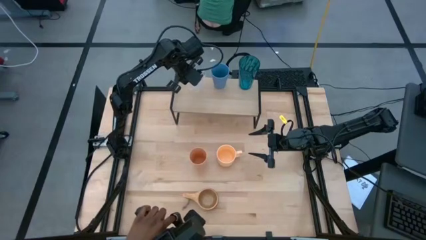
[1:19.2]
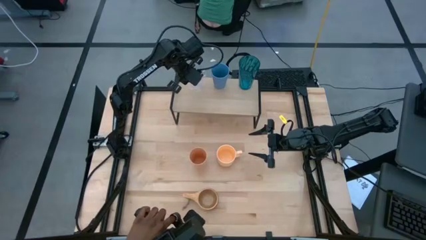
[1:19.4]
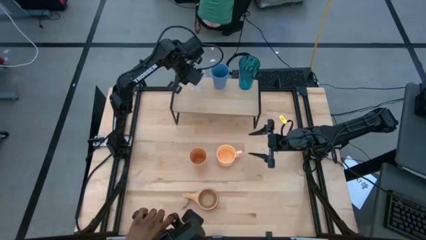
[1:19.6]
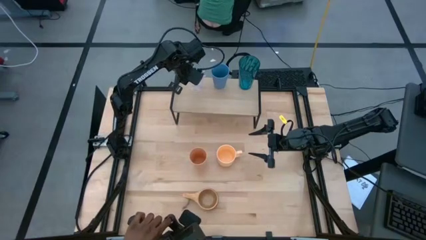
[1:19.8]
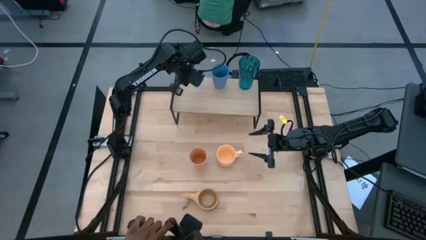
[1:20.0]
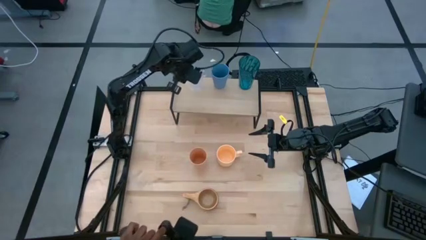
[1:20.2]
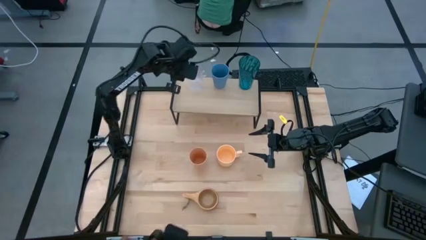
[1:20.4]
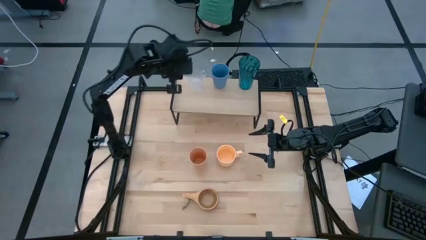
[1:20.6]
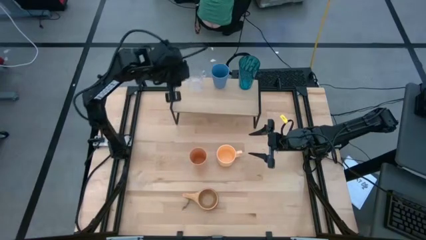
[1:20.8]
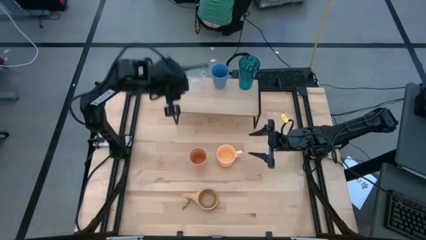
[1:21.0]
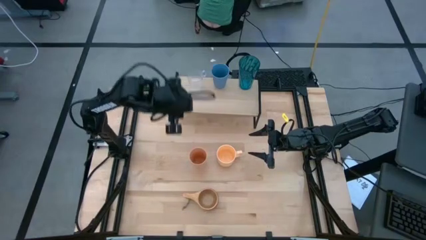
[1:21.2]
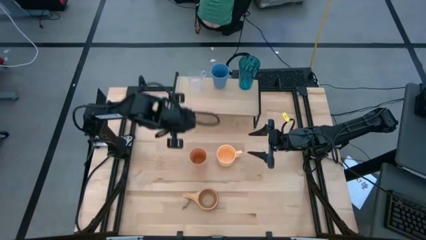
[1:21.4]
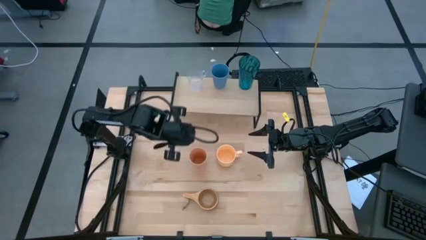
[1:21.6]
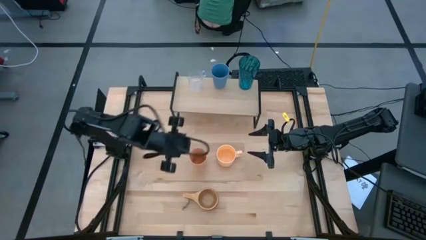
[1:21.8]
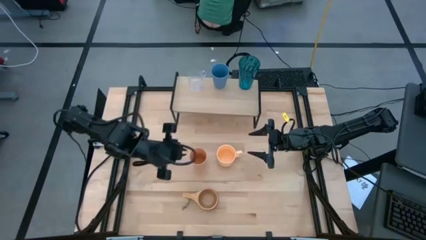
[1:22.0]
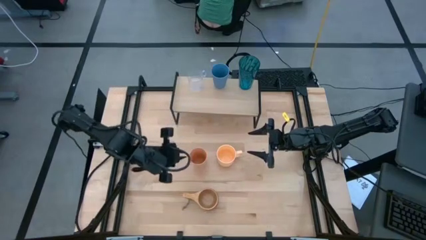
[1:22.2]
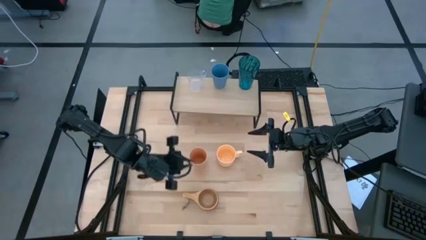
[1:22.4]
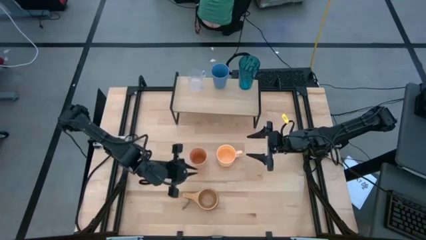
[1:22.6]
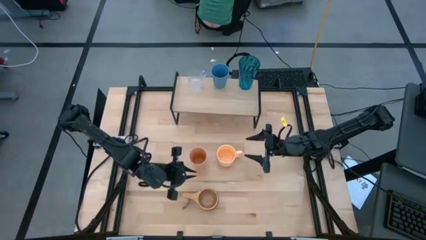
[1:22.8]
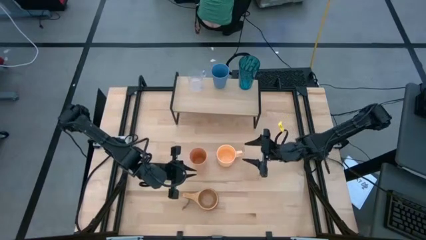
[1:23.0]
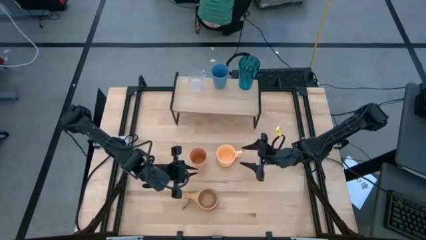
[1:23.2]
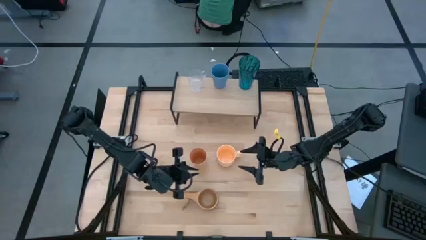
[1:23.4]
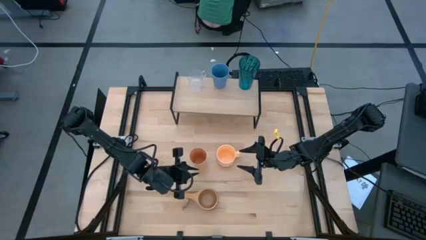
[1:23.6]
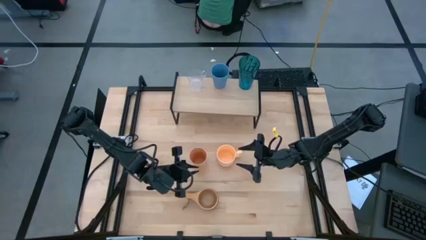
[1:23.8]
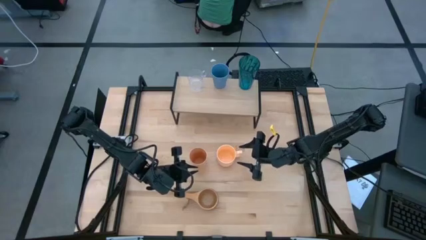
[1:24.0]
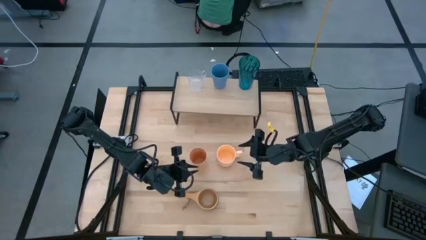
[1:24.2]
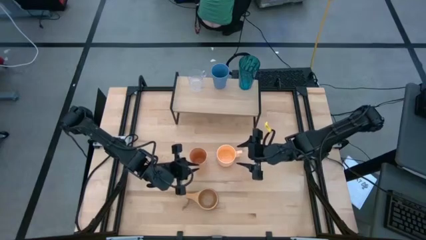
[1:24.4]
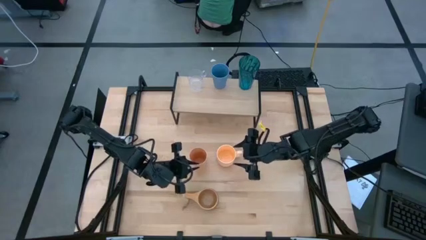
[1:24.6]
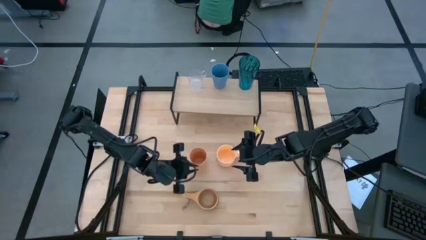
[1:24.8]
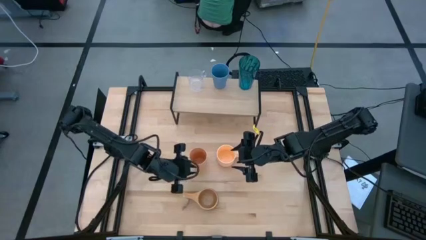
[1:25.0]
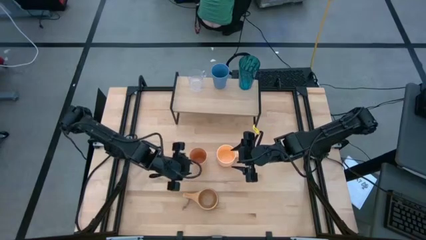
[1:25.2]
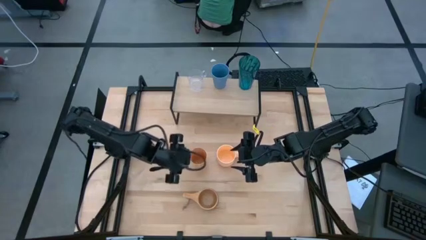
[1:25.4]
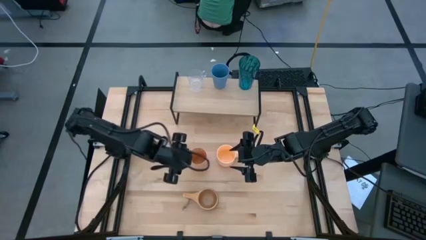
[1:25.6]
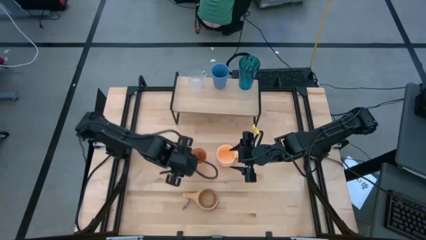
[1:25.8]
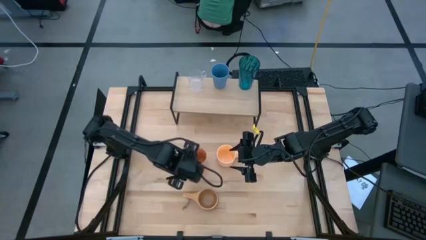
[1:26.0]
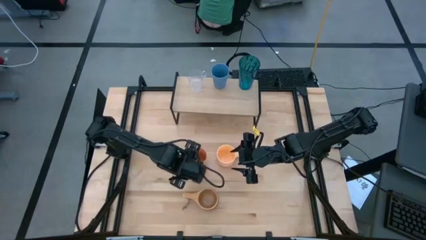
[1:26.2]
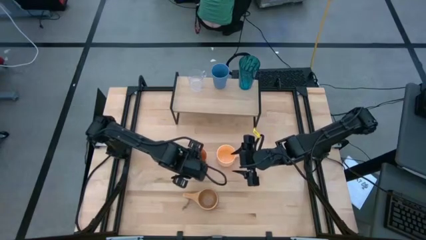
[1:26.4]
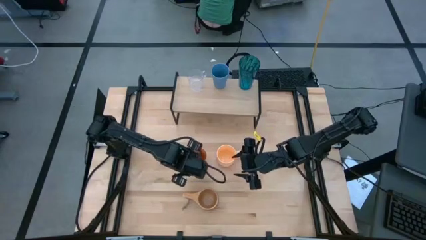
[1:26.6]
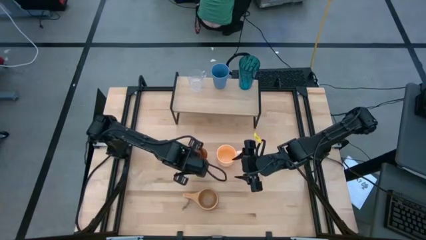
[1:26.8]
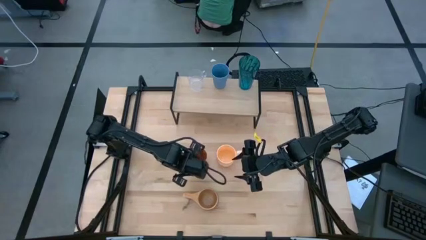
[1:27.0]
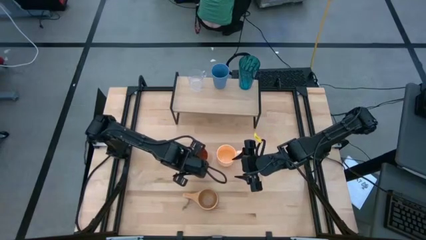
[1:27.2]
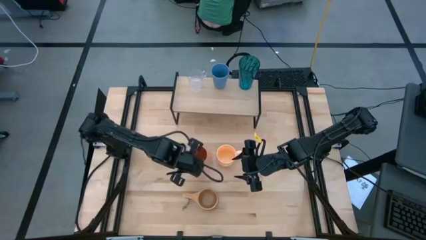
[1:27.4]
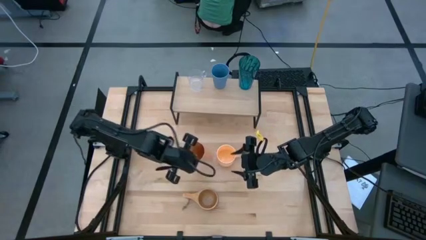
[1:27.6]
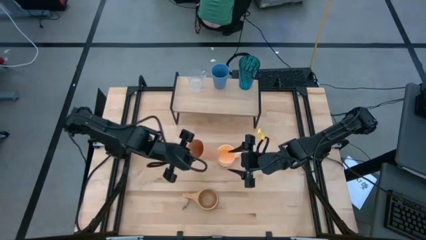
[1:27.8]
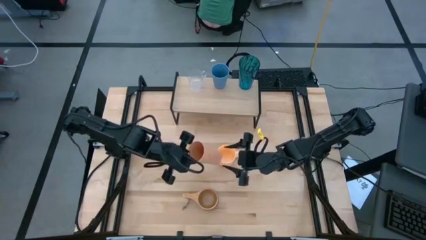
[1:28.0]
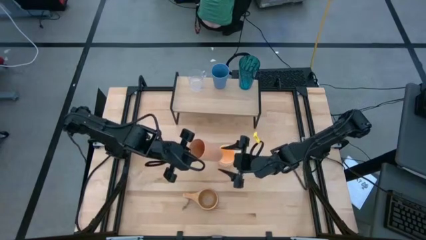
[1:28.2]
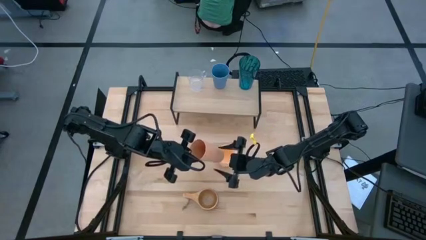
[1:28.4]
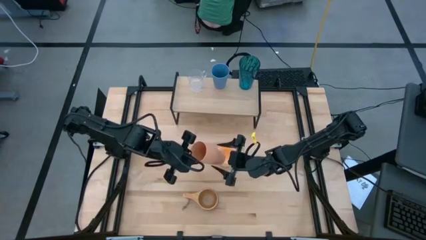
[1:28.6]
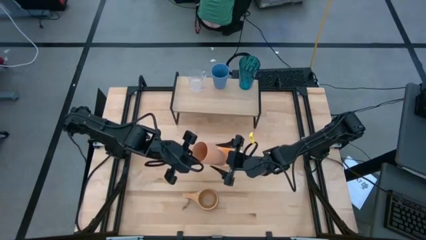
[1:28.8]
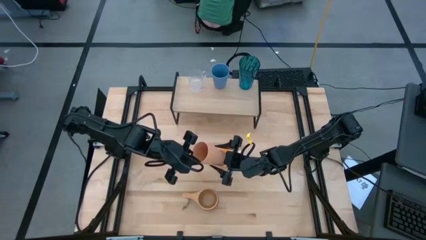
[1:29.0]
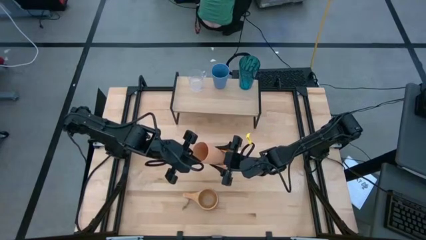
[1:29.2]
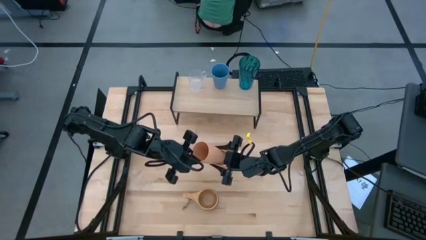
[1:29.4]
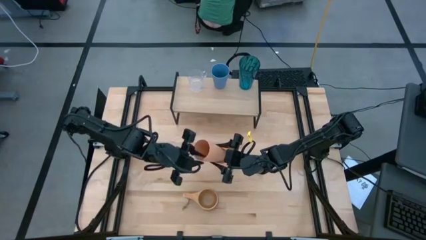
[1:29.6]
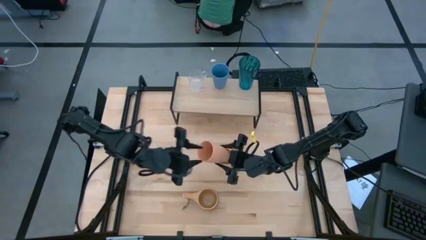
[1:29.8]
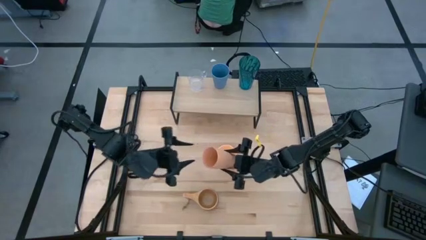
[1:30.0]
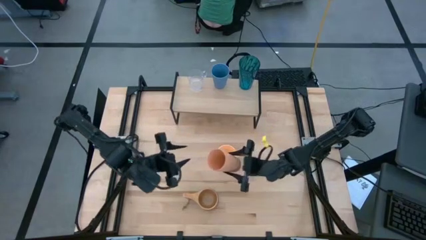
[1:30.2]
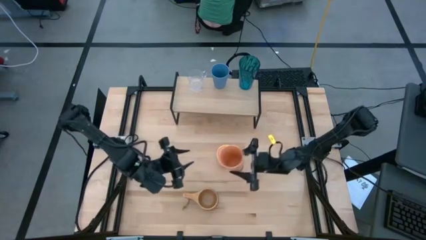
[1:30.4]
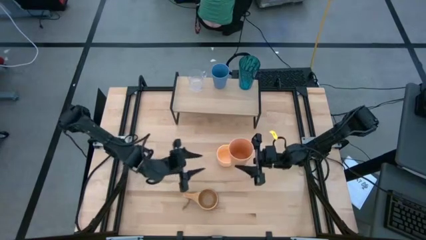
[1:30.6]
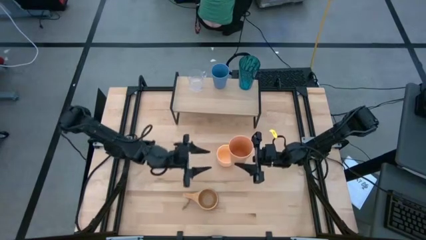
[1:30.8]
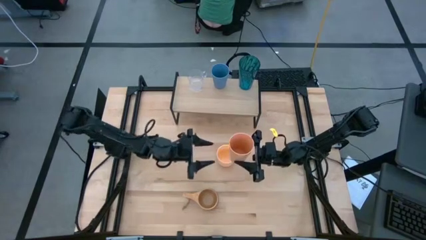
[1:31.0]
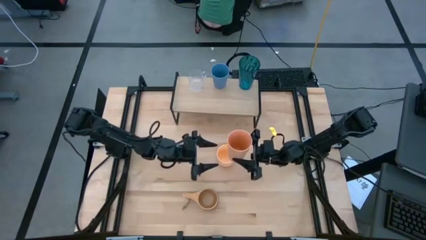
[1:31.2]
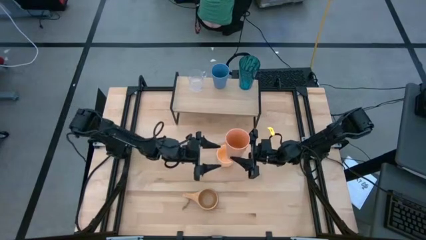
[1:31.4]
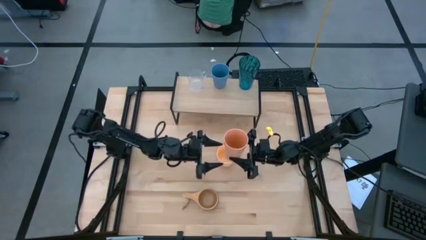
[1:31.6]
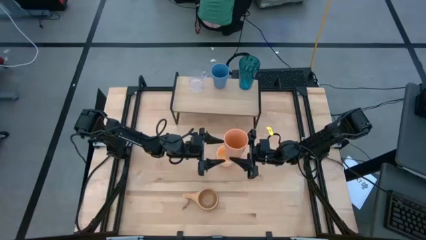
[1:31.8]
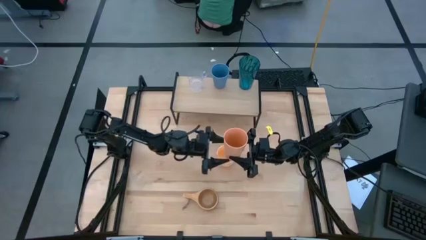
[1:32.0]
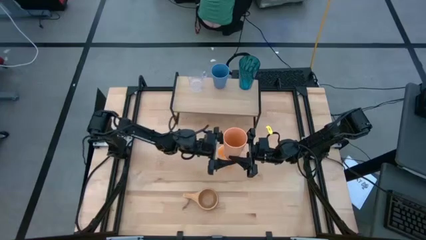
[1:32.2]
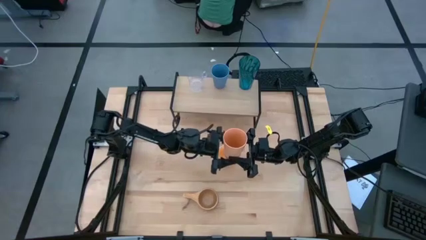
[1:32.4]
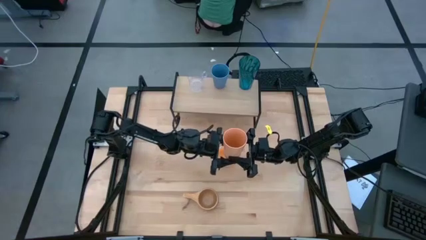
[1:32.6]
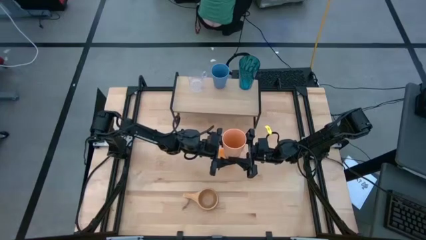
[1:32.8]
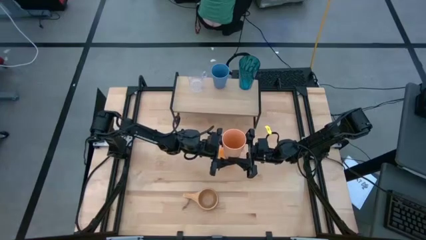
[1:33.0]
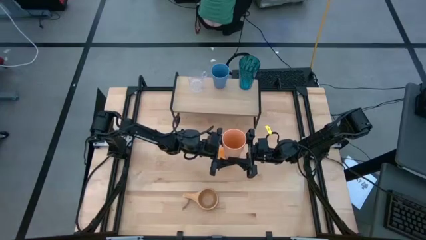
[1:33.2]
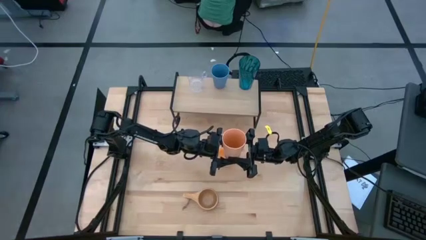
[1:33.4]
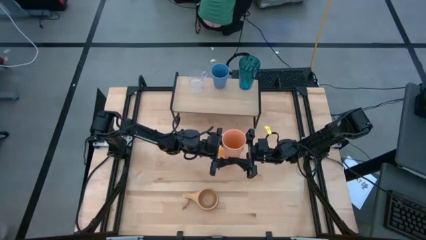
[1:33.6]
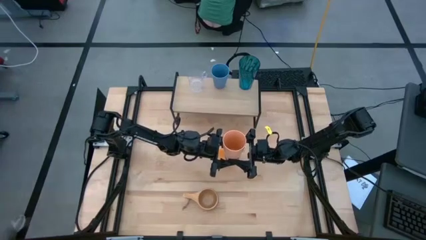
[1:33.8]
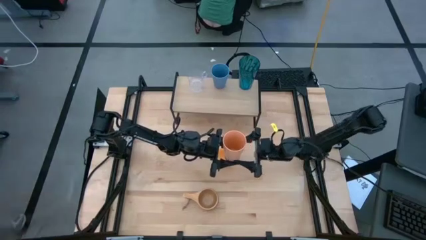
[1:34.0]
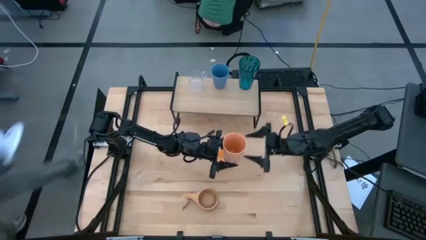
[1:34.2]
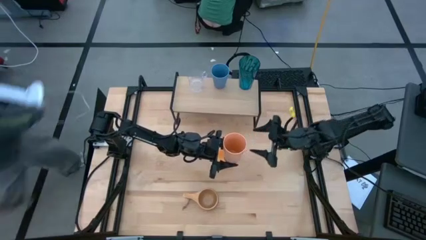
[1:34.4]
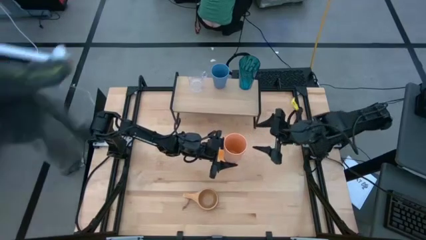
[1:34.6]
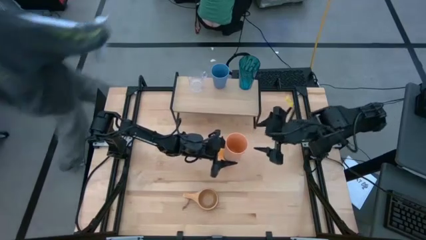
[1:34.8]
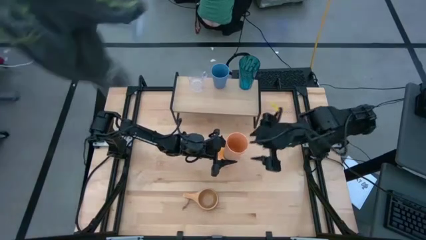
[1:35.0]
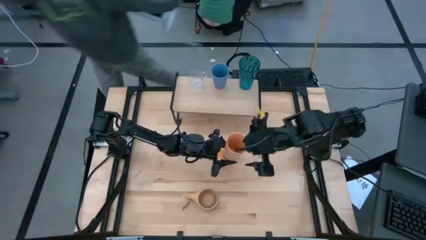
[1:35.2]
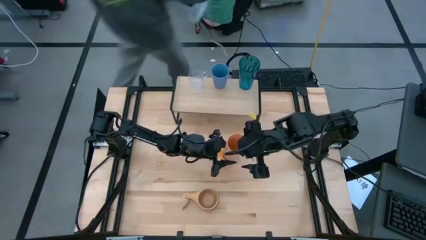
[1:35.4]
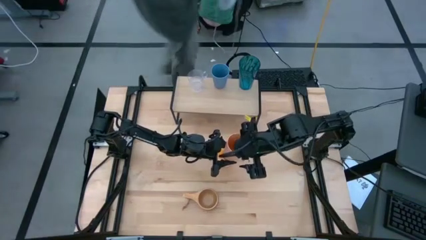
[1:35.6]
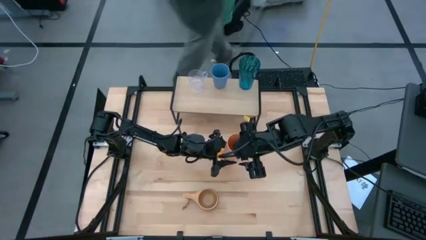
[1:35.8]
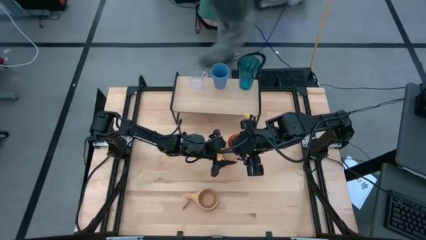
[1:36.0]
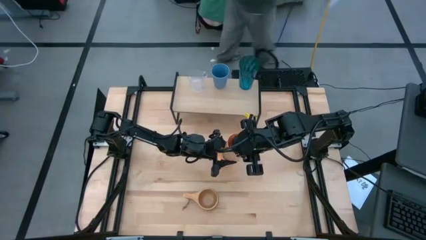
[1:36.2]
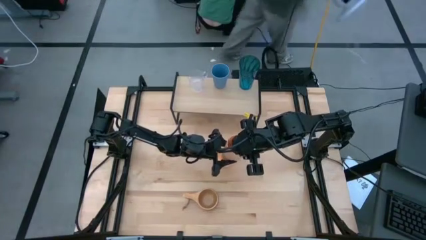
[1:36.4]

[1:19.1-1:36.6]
Task: Stack small to large cups/mugs on shelf
Put the orange cup on the shelf
